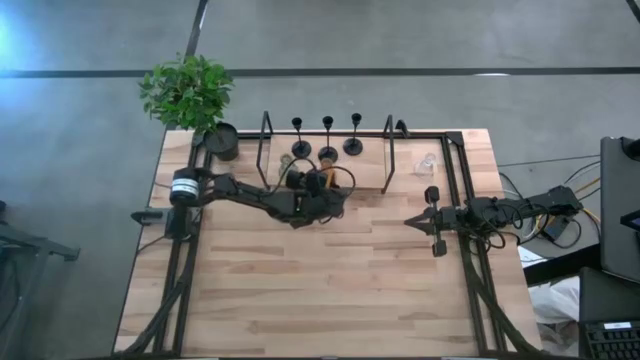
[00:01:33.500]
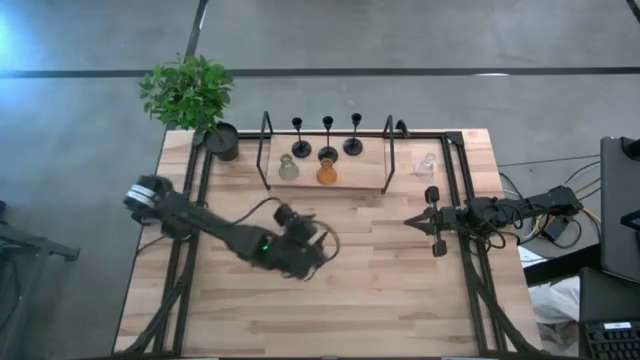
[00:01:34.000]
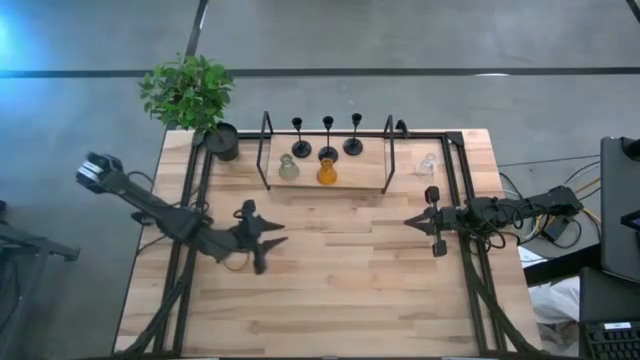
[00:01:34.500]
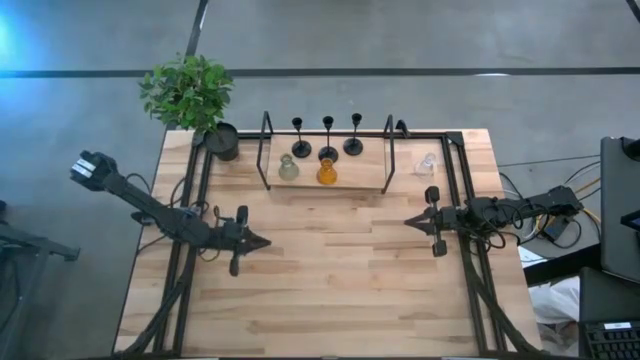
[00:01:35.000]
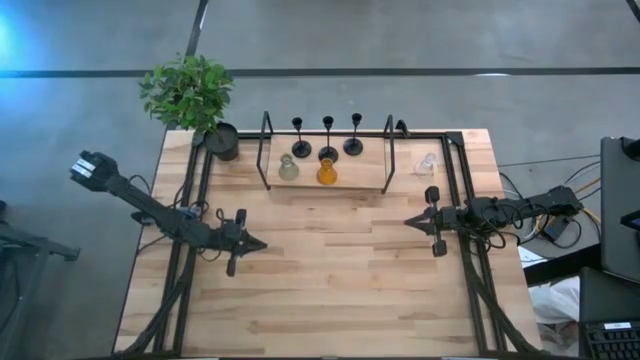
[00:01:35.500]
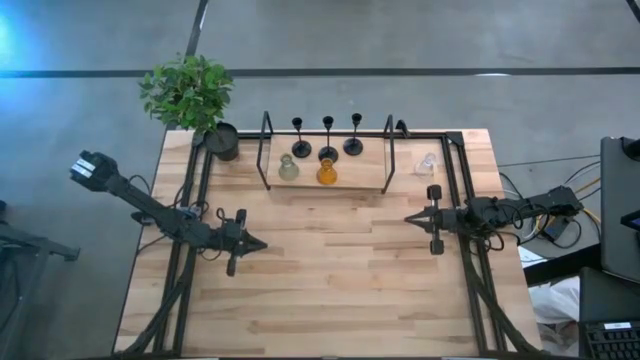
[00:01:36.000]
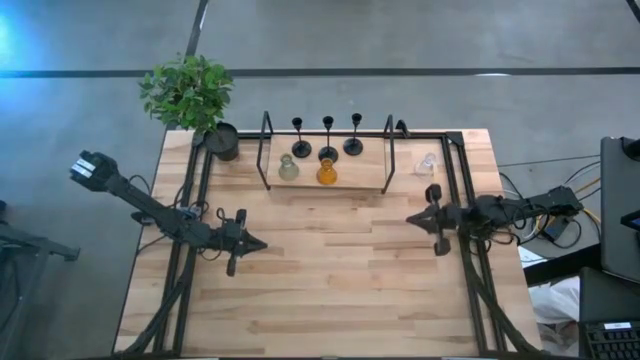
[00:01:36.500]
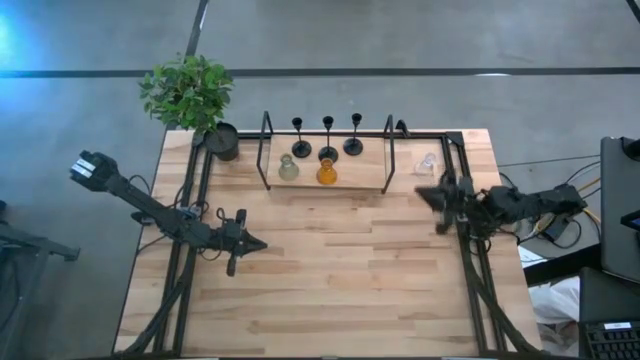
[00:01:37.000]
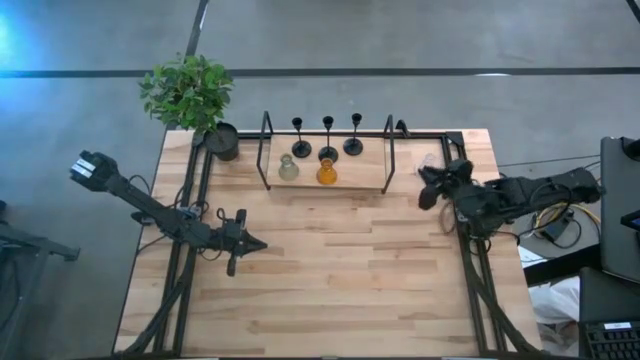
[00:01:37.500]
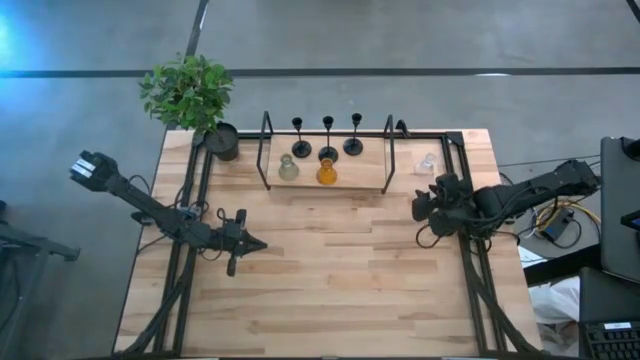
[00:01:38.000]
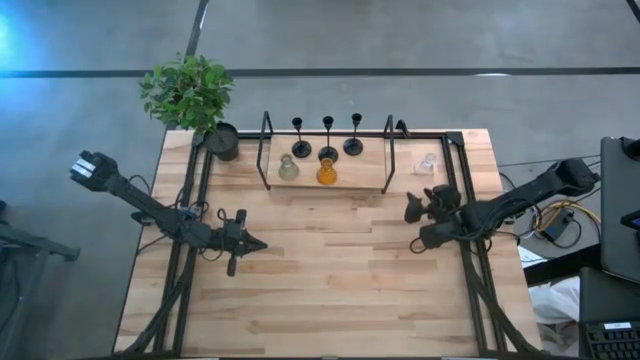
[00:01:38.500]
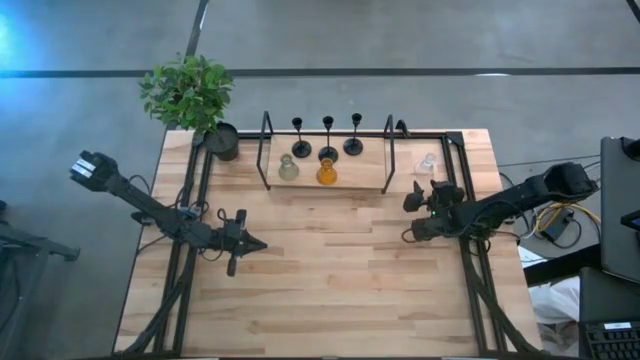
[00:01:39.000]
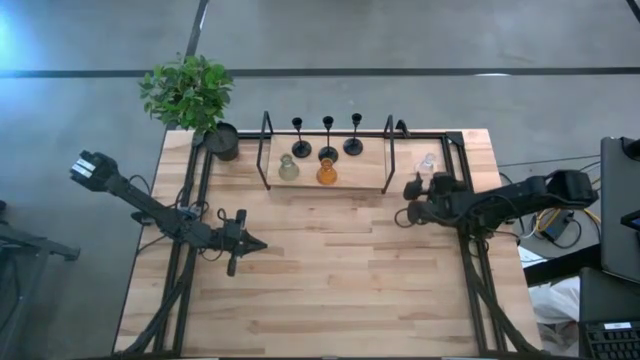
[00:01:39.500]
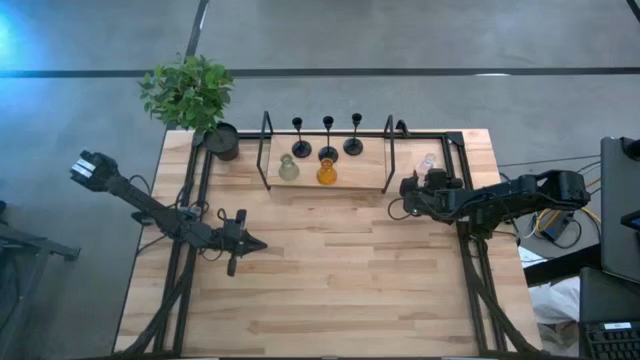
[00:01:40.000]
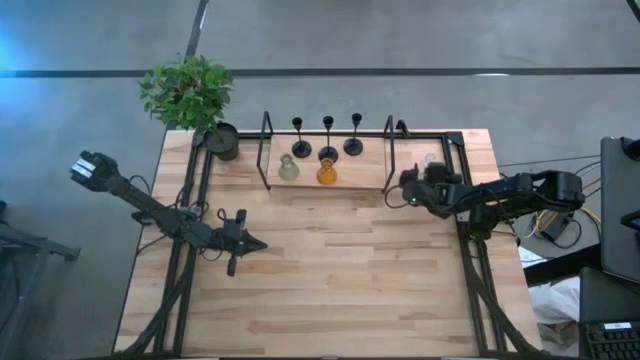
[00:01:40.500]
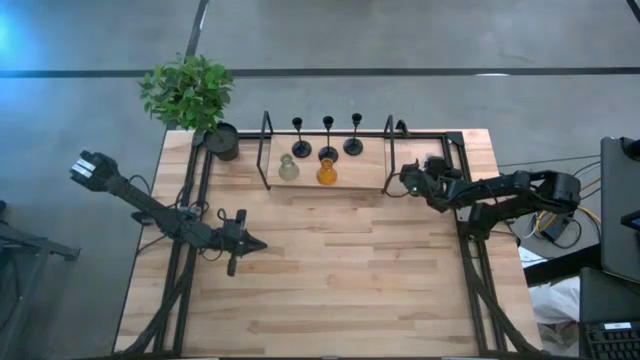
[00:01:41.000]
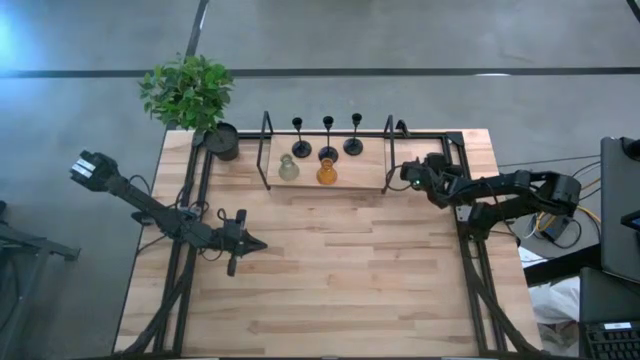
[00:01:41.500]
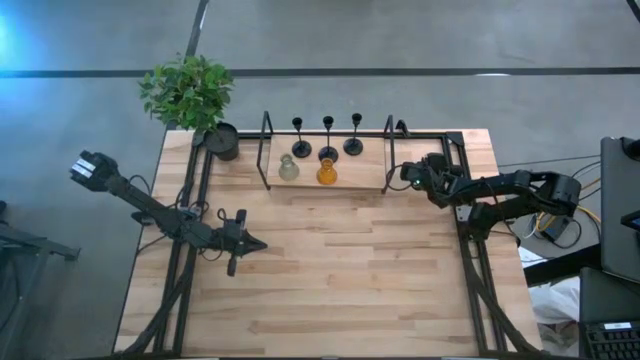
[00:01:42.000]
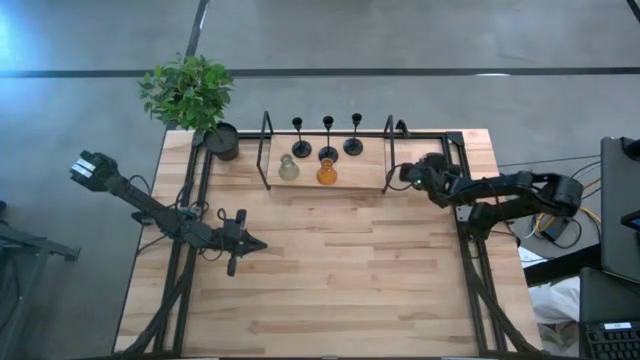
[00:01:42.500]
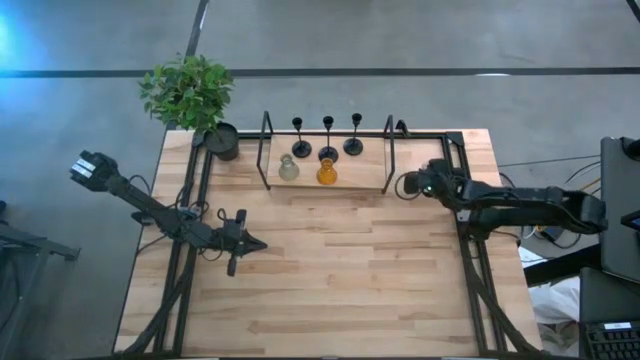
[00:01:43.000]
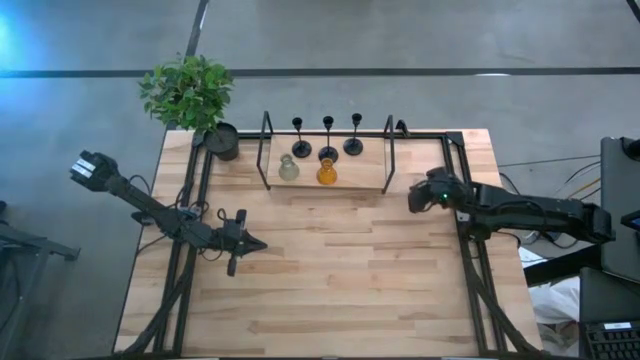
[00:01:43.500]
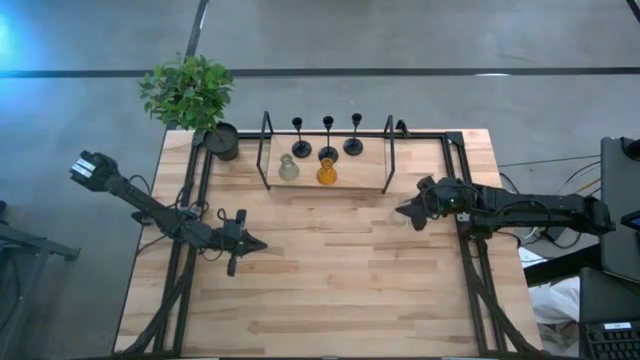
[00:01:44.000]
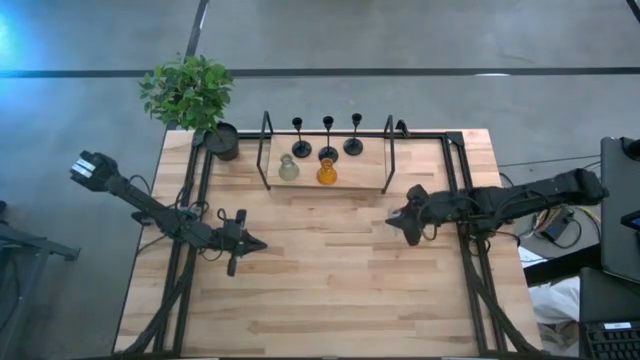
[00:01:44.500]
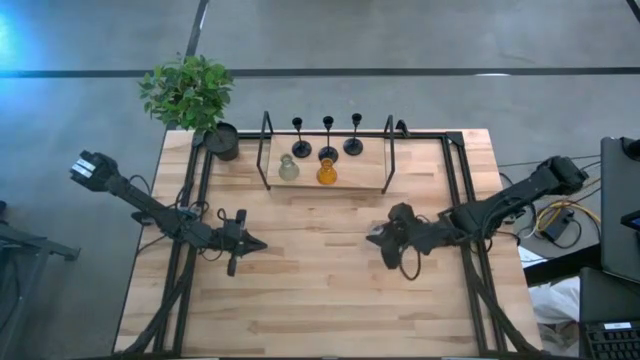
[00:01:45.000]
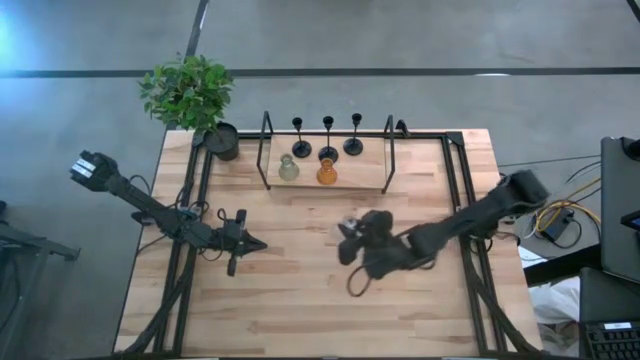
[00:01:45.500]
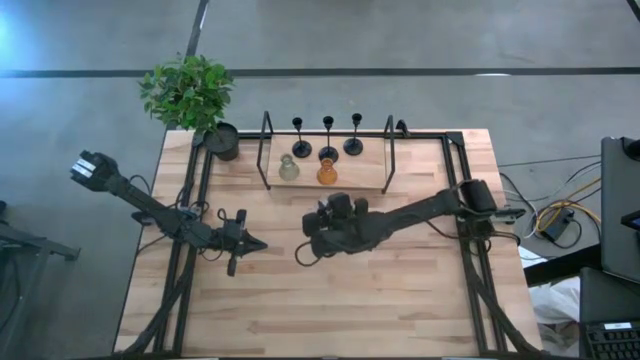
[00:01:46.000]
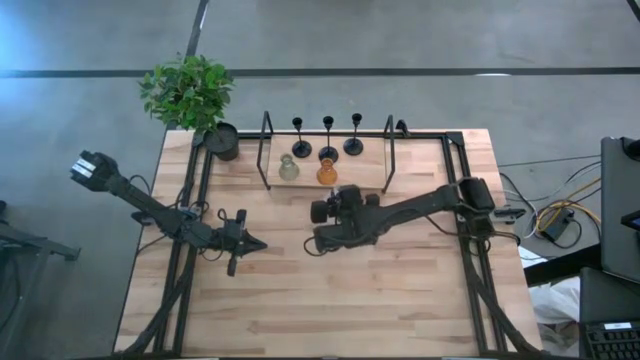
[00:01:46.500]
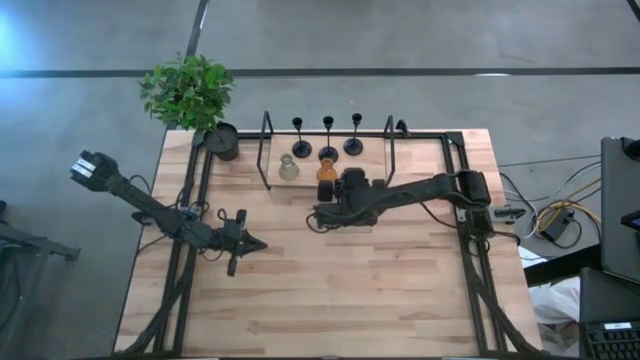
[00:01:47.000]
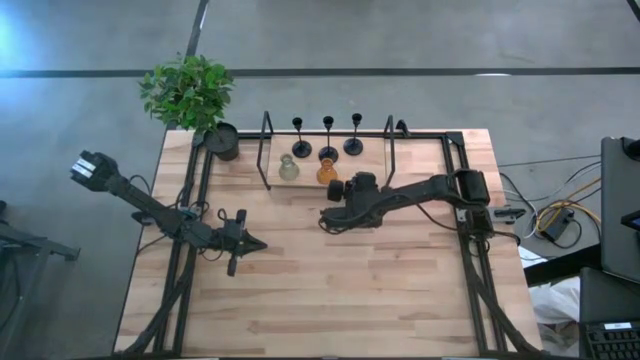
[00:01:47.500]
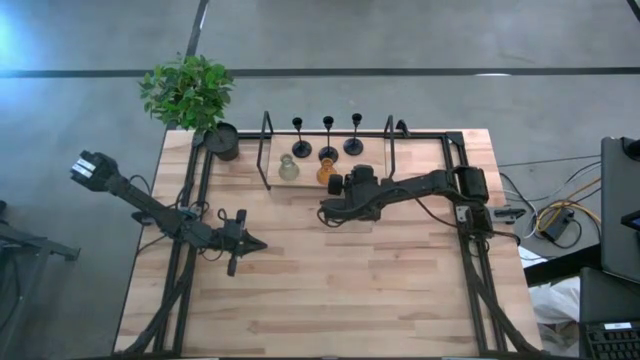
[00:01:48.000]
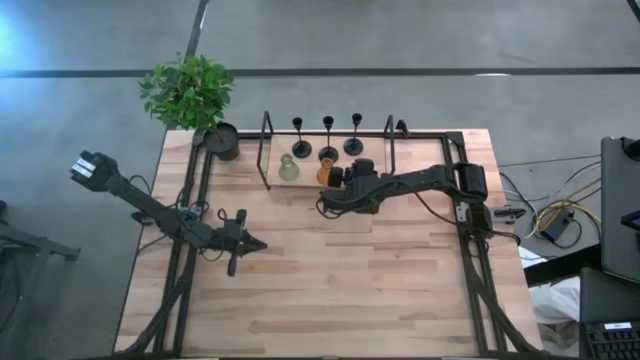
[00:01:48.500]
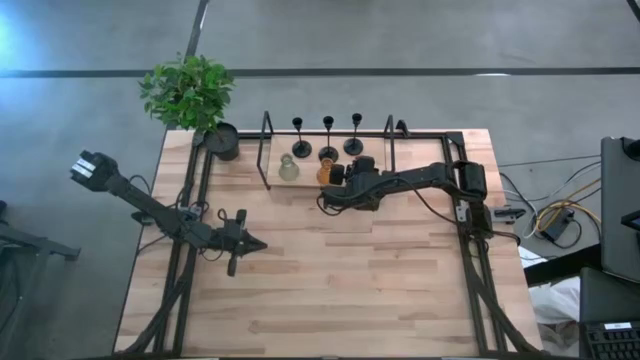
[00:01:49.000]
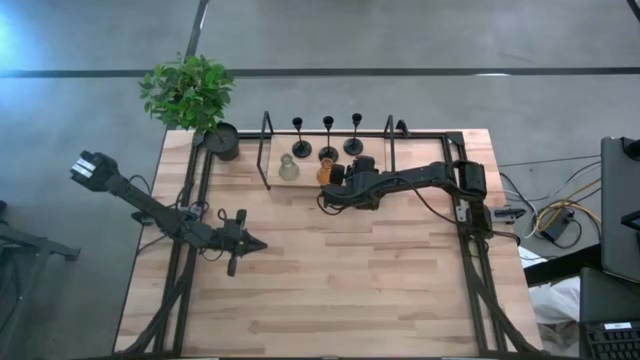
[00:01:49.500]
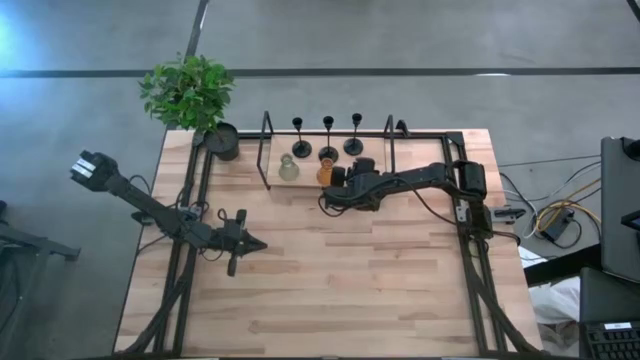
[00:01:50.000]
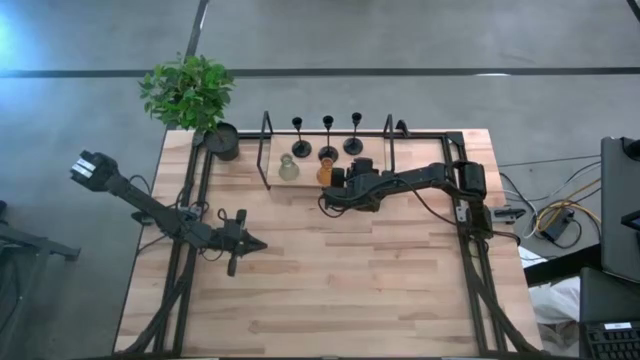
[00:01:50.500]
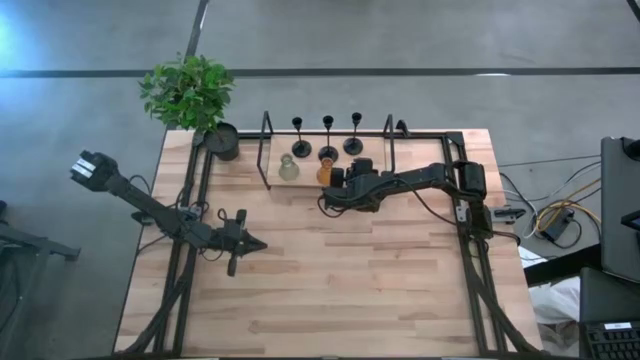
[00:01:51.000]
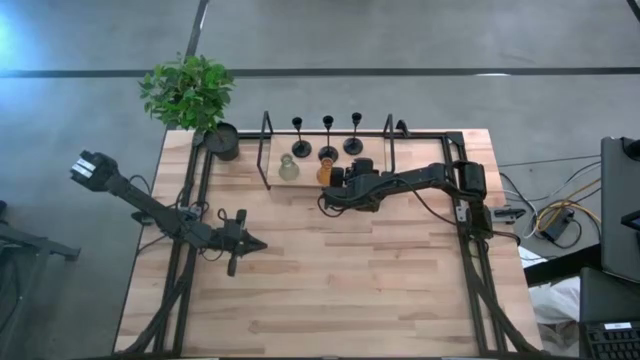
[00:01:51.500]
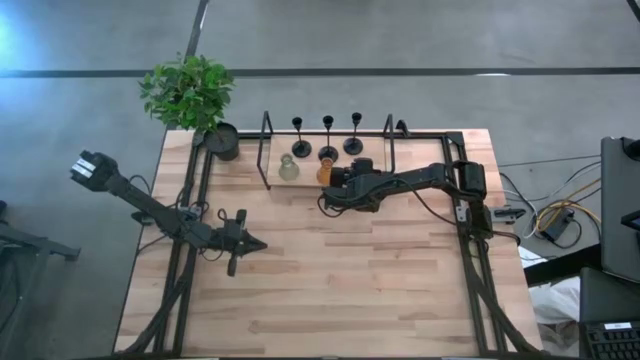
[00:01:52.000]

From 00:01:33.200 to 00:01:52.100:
Task: Pick & Place candle stick holders
Put the transparent glass candle holder on the shelf aligned with the other glass candle holders

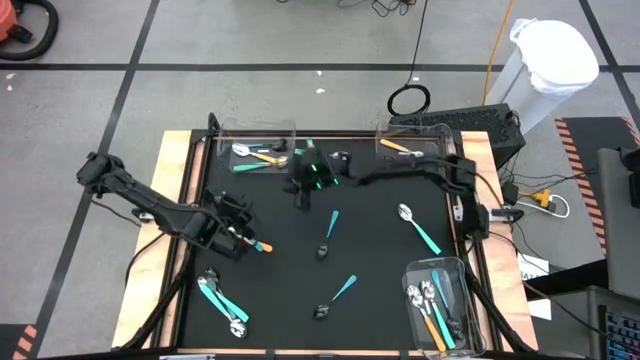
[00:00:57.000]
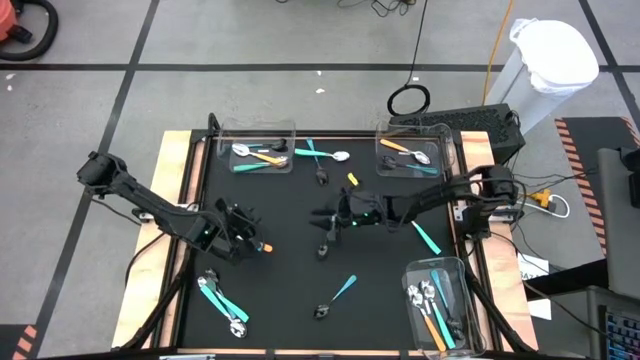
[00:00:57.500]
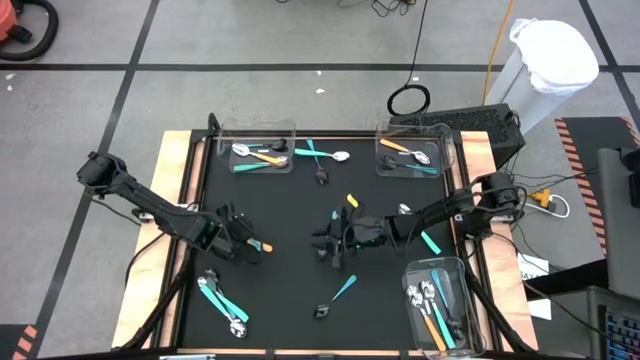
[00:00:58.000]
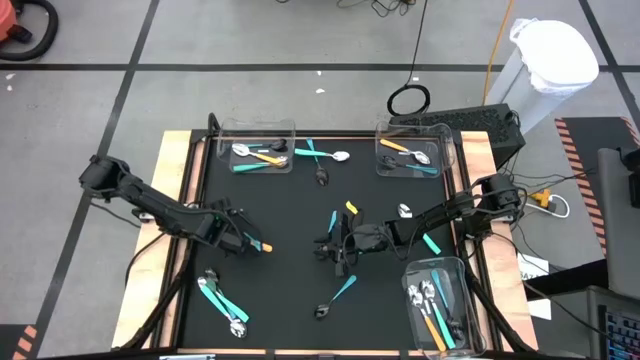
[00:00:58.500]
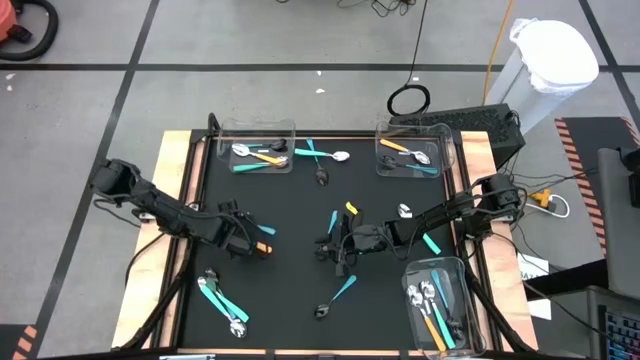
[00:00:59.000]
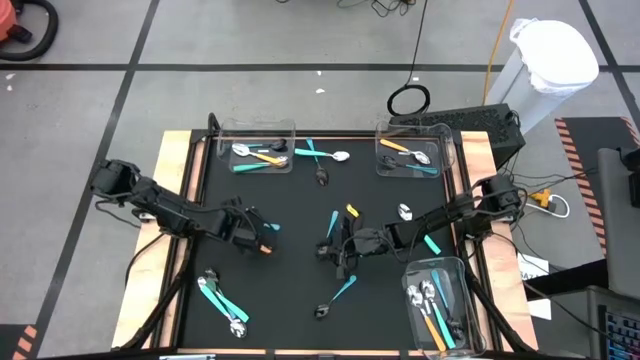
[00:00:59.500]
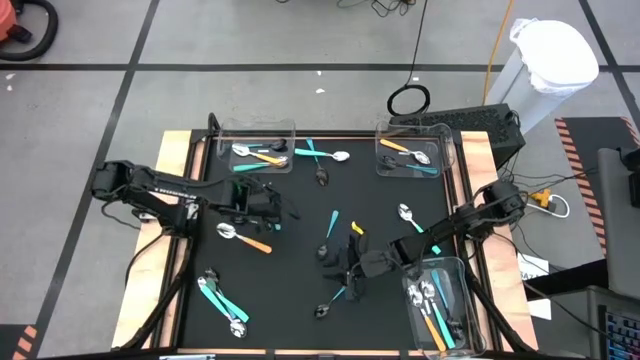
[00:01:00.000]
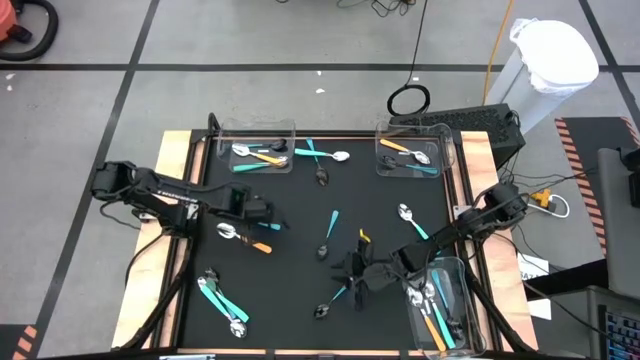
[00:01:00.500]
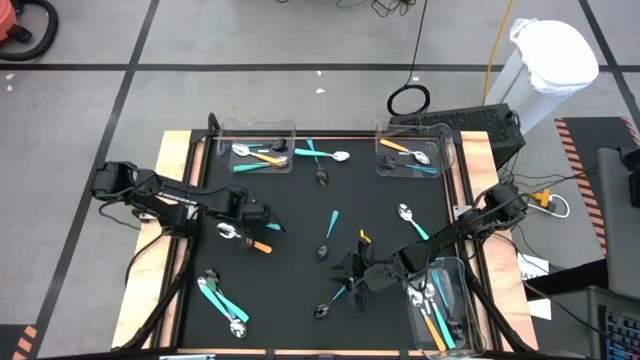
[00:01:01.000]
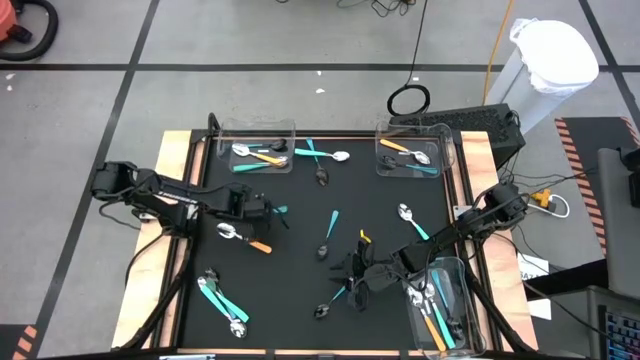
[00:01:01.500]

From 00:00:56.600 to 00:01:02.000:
Task: Sort silverware by color (type)
Put the blue spoon into the top left transparent bin
